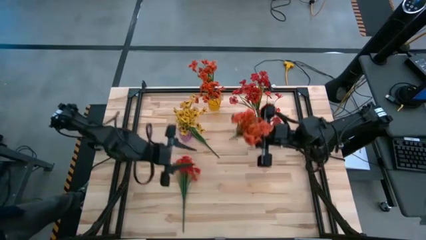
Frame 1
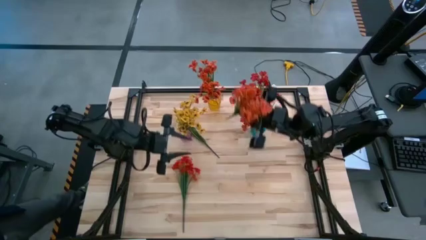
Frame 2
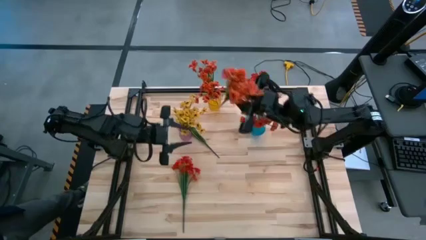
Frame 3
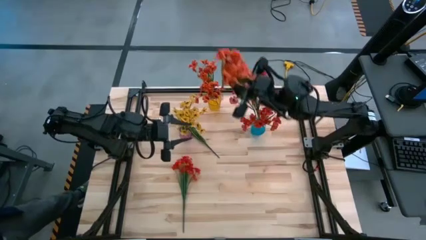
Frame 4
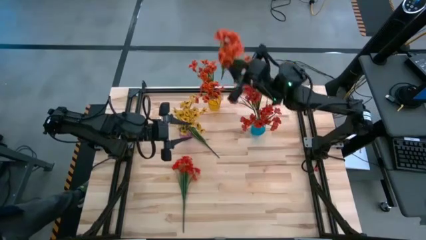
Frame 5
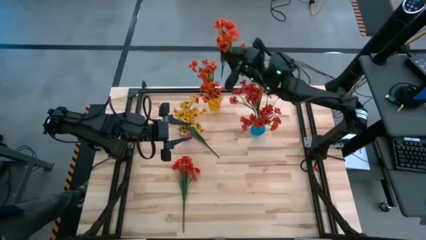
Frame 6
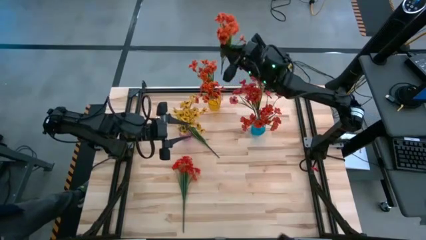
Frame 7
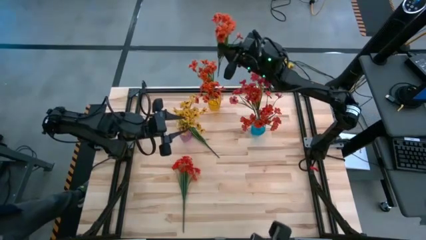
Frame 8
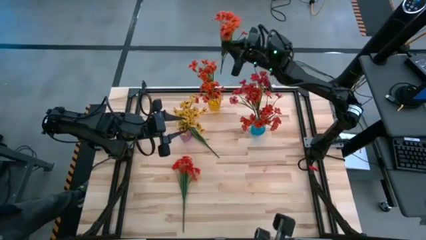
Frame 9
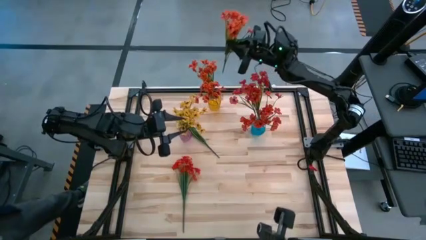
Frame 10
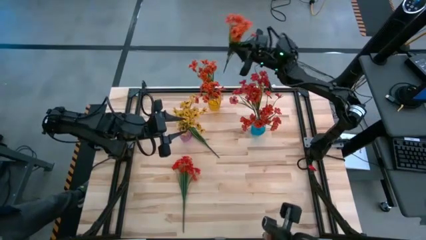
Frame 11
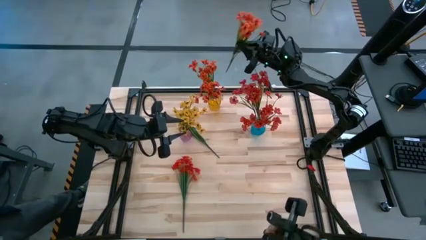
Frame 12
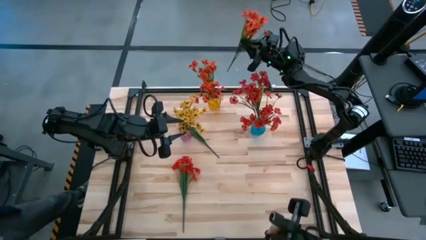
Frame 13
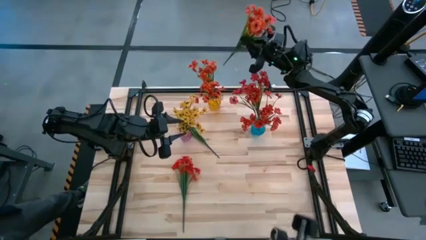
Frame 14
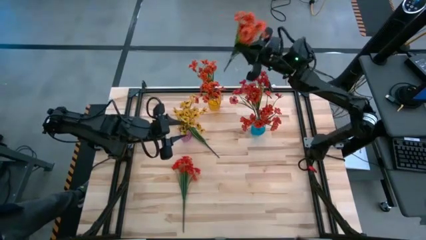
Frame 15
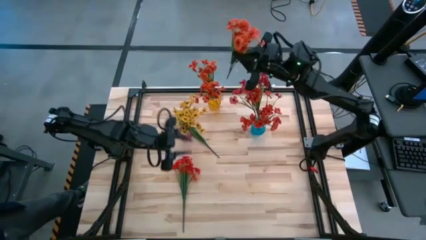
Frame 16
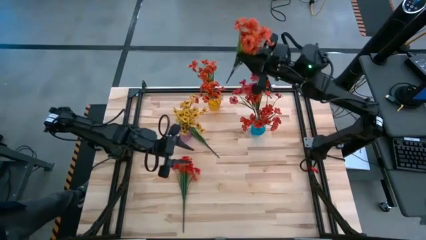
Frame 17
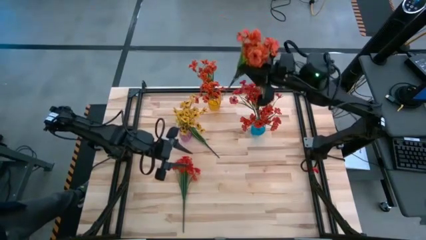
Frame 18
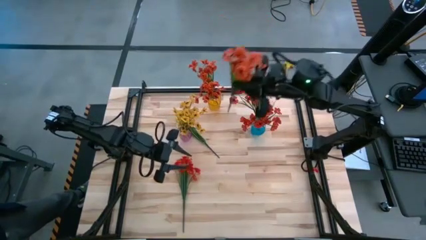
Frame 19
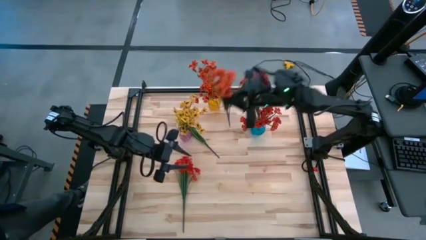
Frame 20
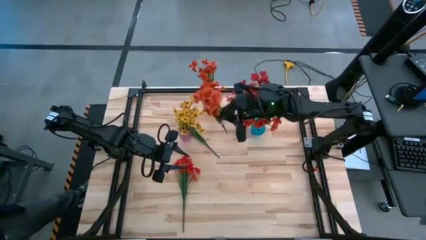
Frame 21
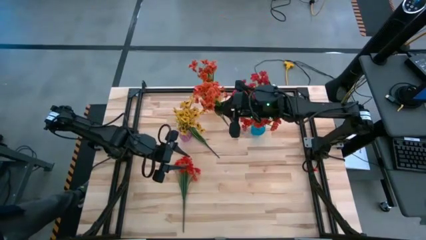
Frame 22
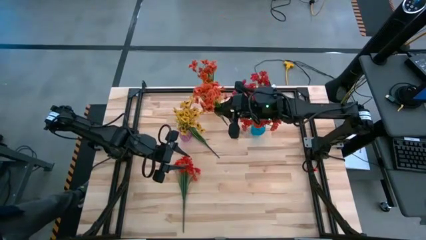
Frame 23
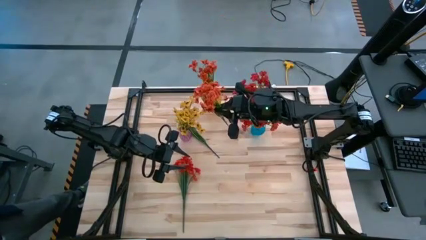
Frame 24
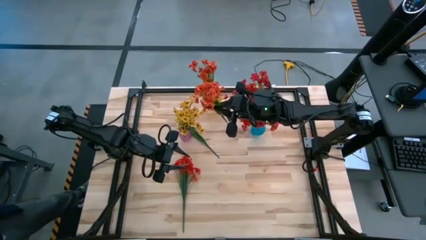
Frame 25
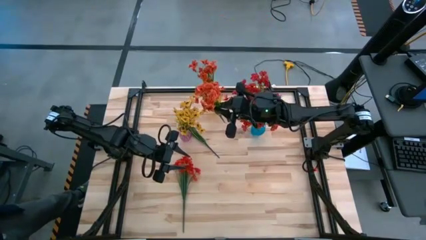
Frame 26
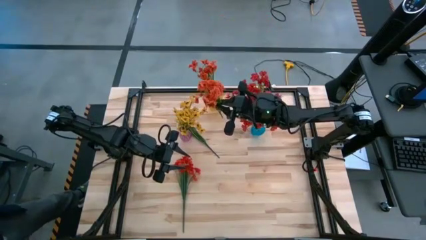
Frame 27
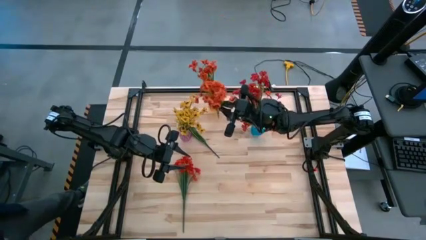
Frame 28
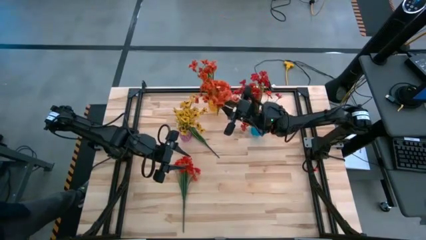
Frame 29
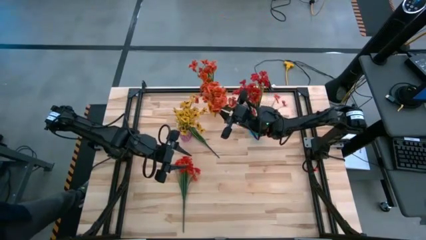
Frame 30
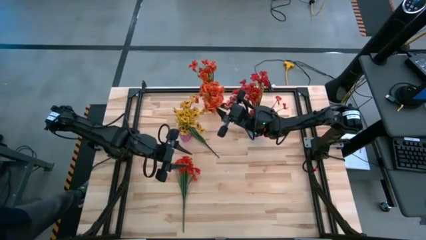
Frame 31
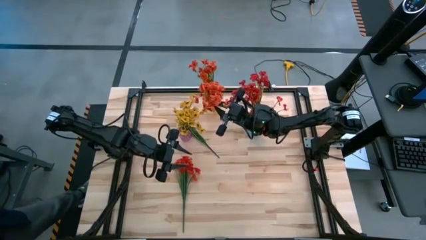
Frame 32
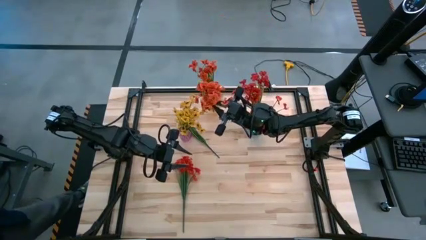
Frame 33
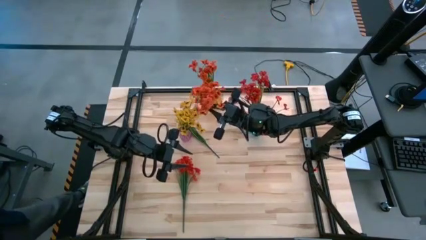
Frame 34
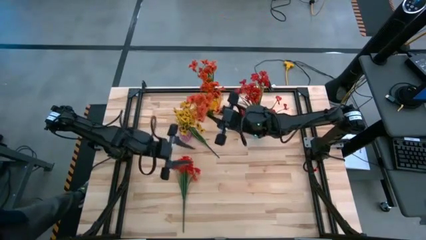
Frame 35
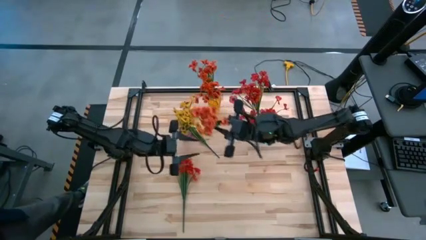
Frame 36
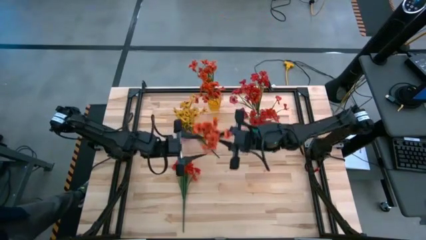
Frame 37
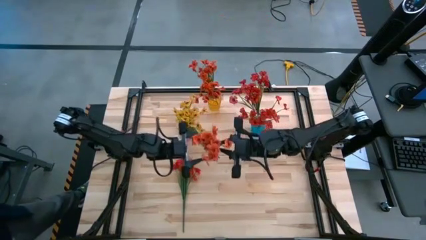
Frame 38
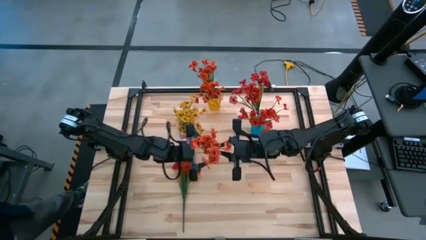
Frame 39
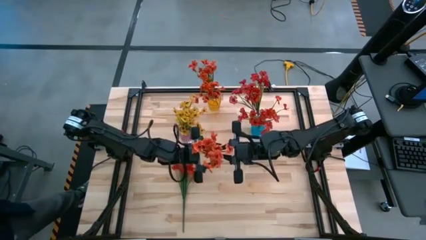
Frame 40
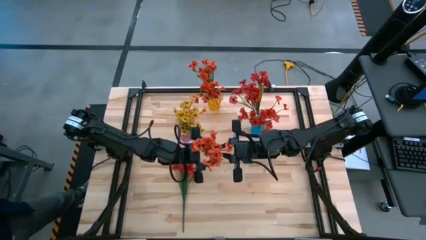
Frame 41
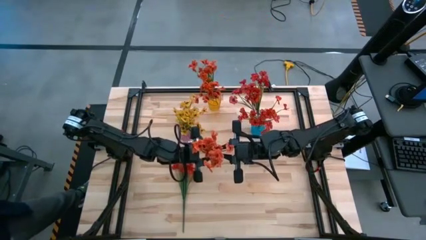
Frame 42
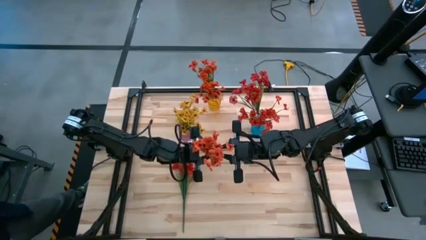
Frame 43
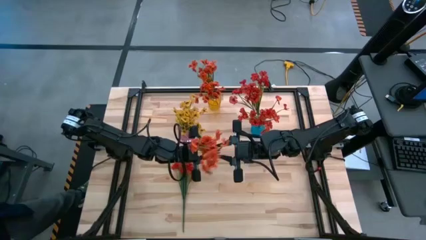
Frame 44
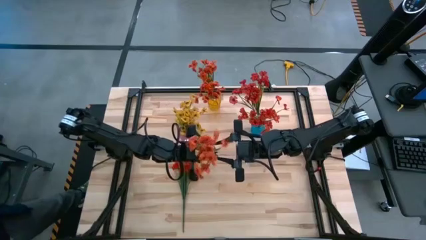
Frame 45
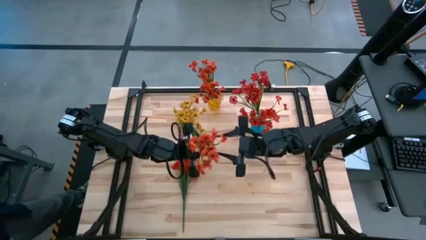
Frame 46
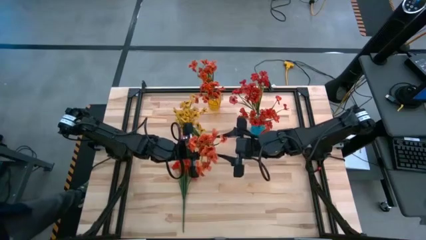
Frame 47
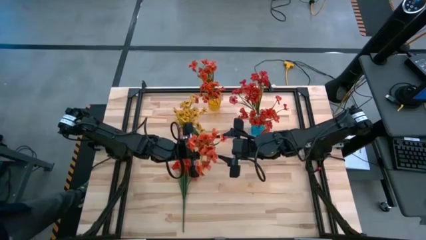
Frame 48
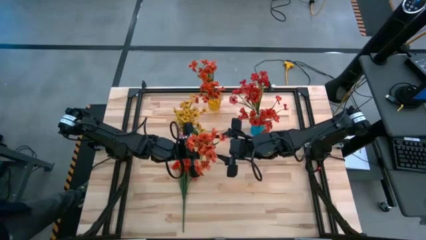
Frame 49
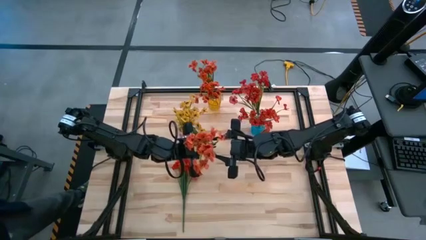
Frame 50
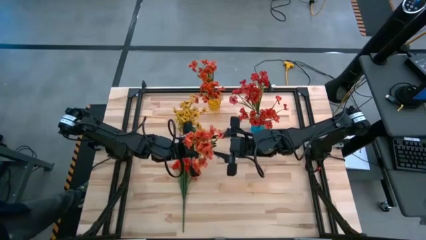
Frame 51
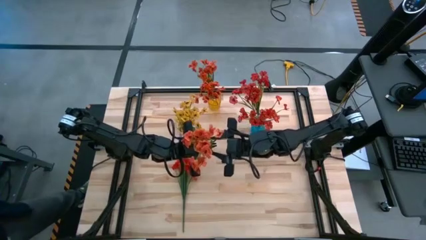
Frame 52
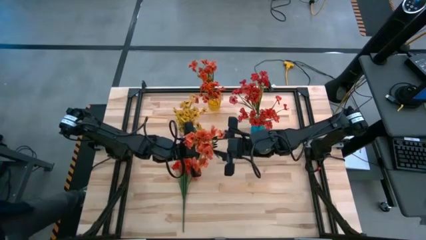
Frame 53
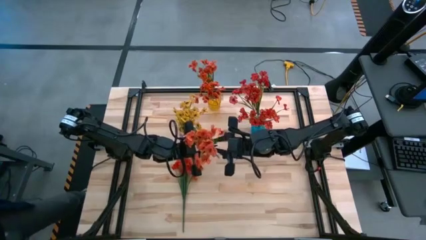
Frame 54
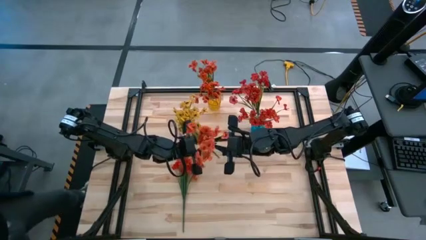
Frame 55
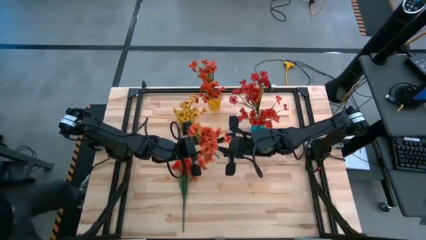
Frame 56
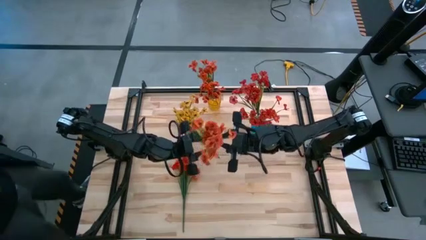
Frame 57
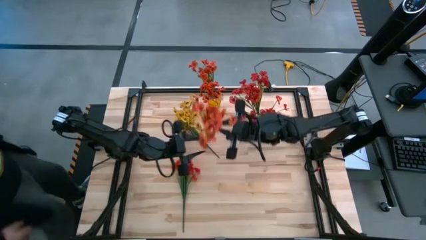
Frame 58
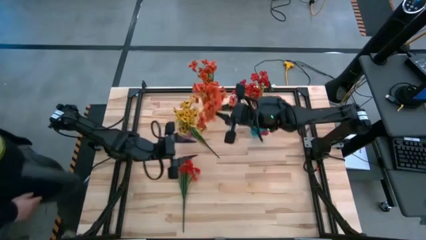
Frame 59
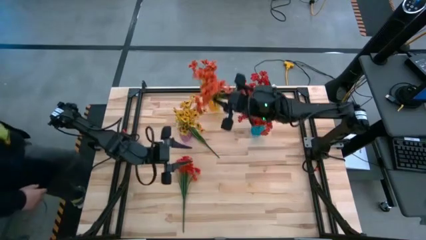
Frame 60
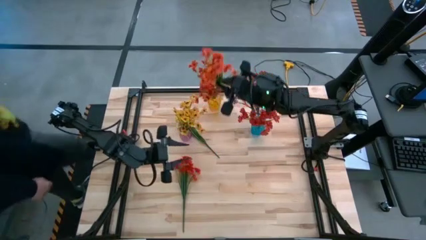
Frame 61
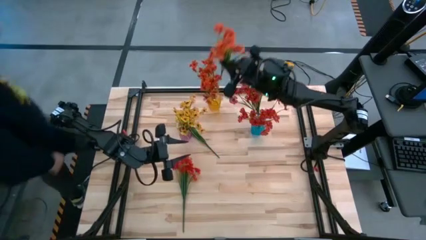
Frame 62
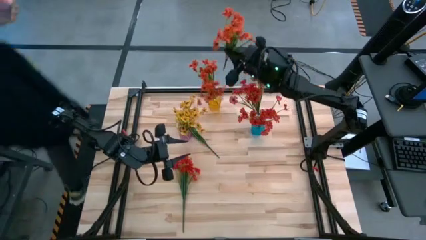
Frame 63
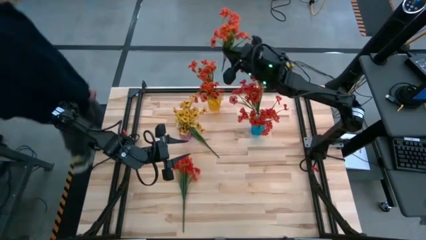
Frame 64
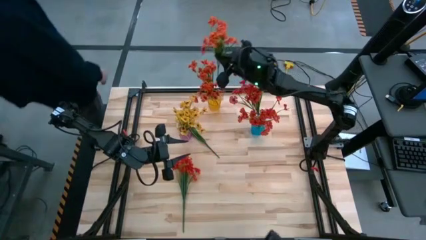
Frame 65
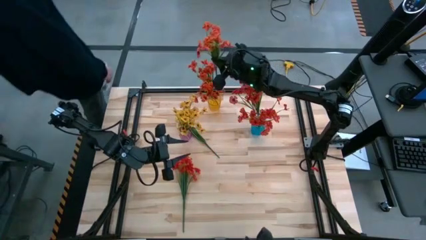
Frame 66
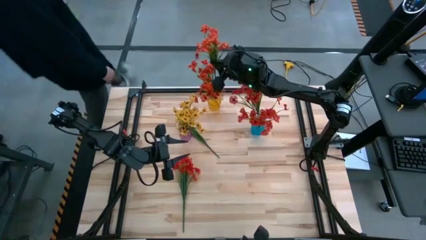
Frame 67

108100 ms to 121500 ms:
Task: Sort flowers into vase by color
Put the orange flower into the yellow vase

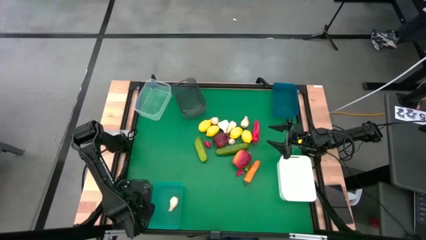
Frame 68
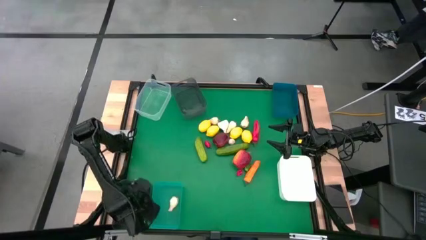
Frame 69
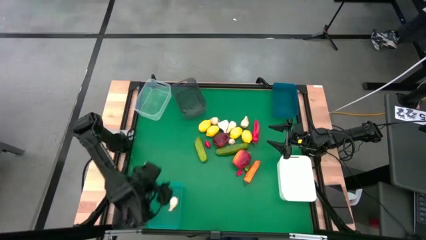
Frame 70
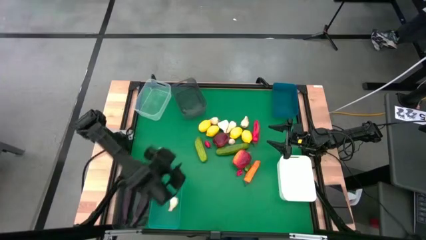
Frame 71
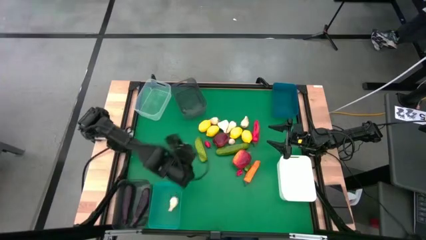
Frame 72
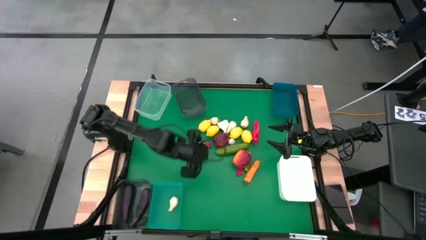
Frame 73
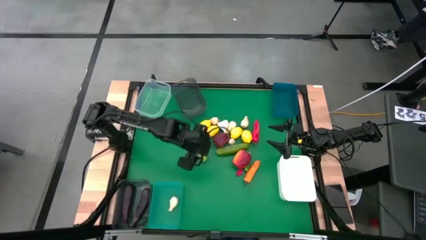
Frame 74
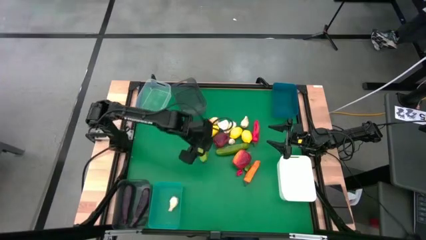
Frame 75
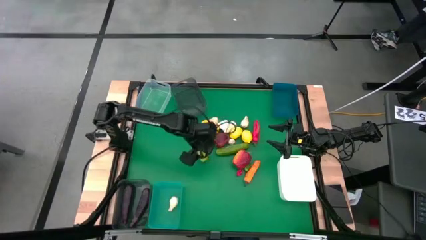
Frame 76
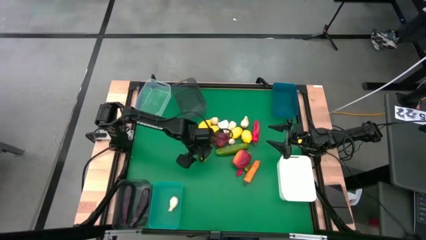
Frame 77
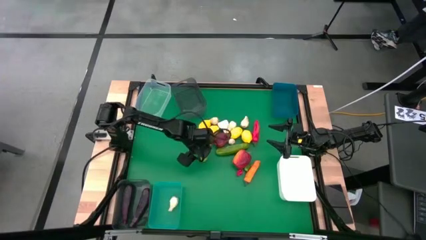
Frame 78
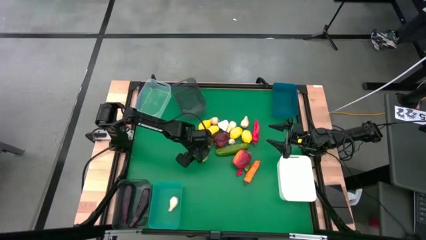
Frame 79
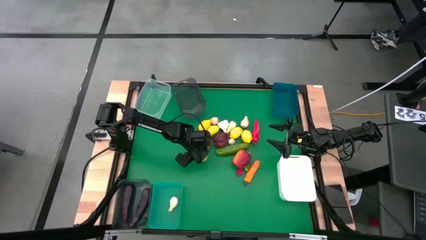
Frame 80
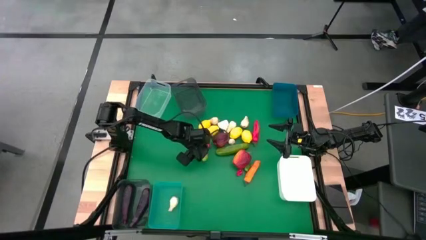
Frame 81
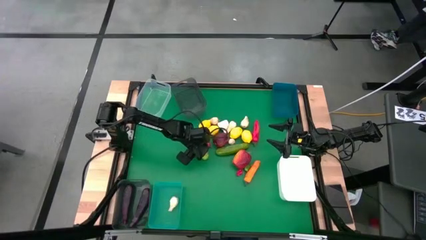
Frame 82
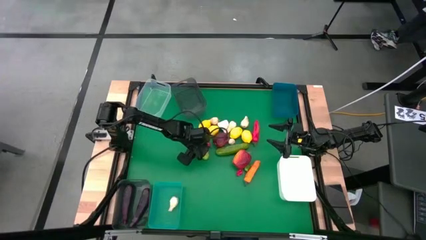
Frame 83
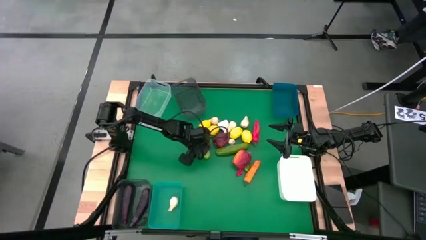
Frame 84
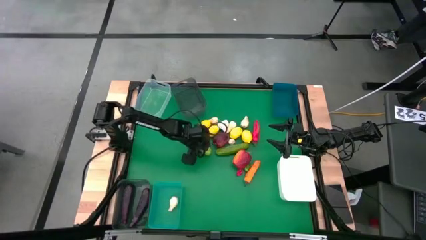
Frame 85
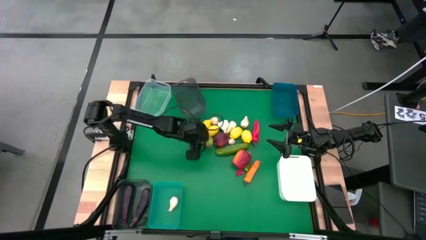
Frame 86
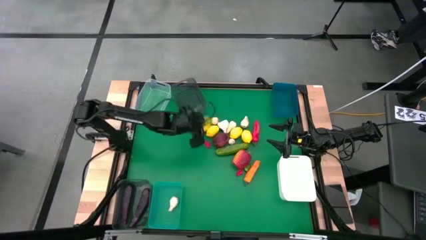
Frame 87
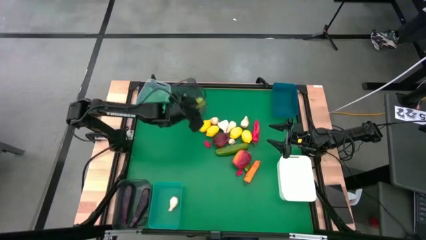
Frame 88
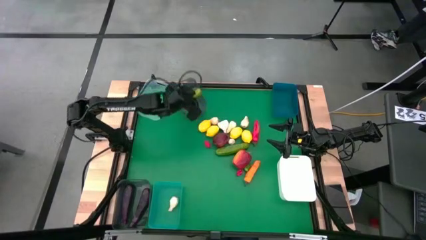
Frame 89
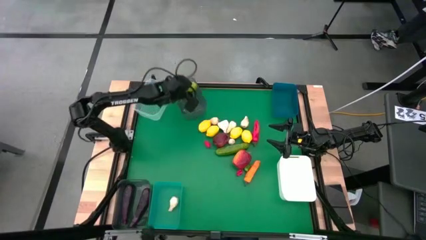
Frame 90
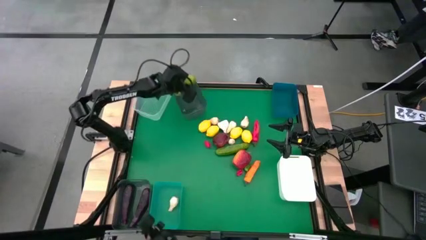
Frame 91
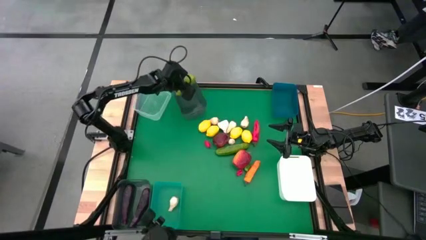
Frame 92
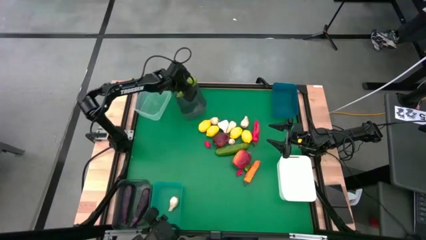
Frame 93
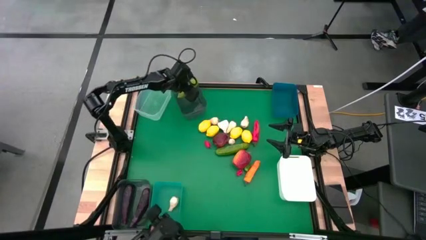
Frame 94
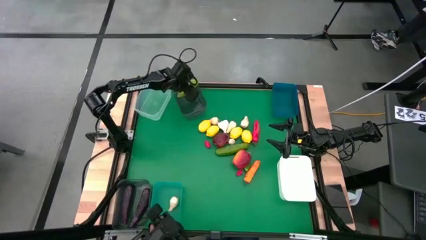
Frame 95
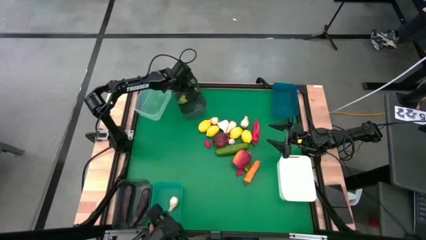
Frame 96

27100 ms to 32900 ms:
Task: Sort produce into baskets
Put the cucumber into the top black bin
